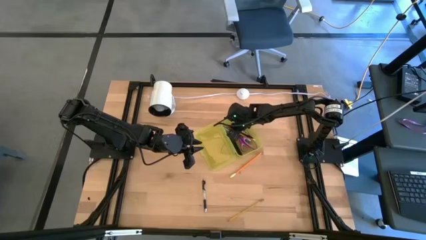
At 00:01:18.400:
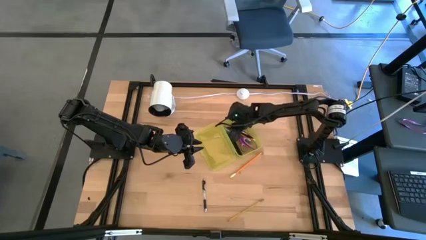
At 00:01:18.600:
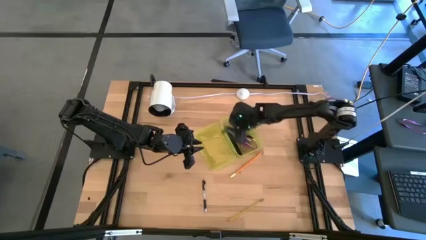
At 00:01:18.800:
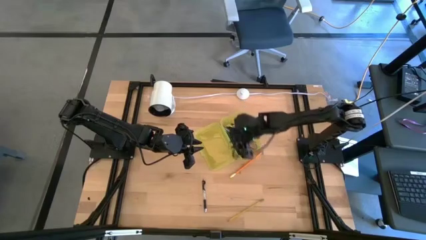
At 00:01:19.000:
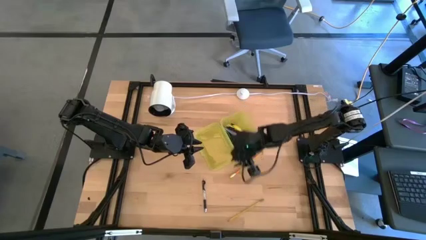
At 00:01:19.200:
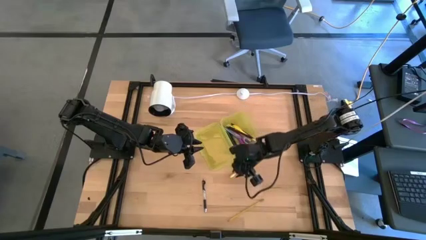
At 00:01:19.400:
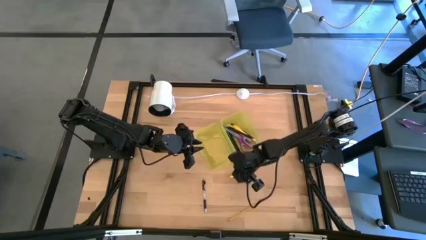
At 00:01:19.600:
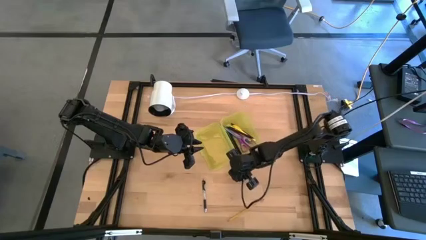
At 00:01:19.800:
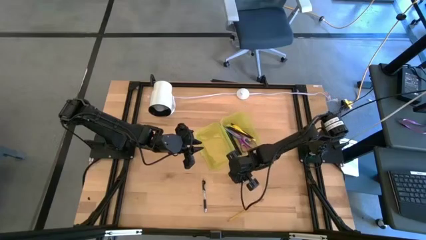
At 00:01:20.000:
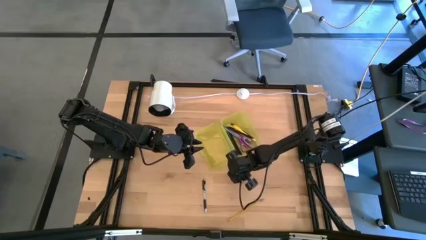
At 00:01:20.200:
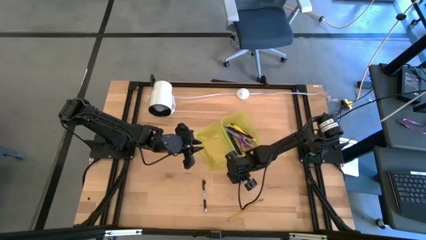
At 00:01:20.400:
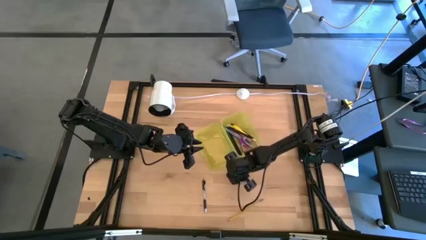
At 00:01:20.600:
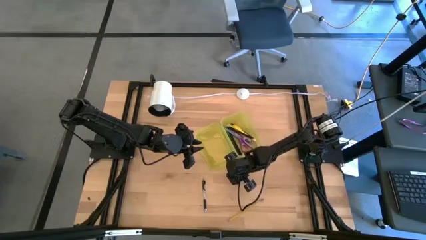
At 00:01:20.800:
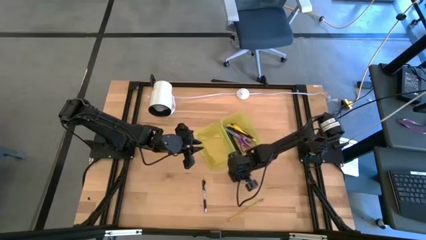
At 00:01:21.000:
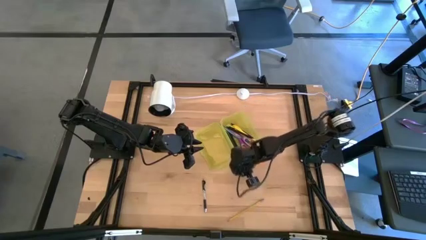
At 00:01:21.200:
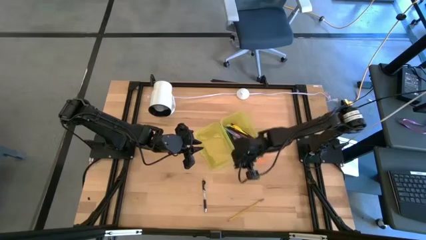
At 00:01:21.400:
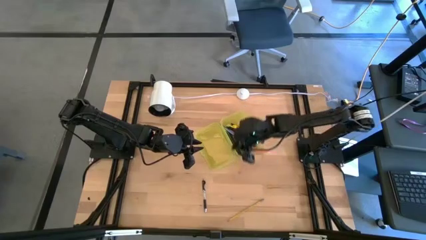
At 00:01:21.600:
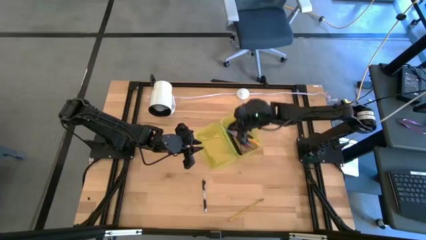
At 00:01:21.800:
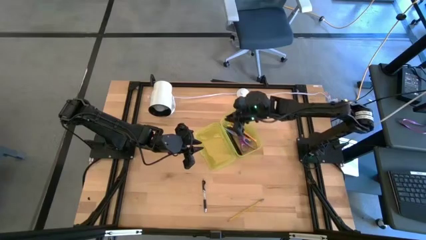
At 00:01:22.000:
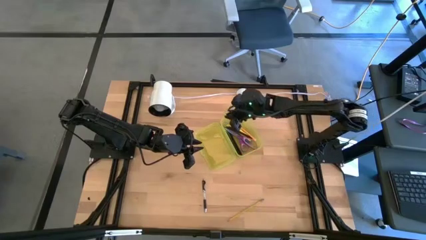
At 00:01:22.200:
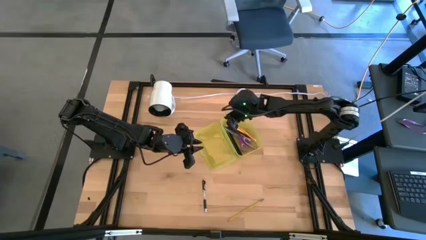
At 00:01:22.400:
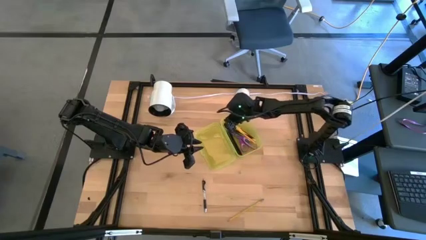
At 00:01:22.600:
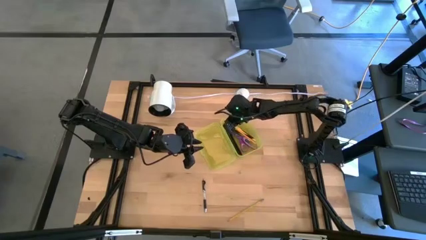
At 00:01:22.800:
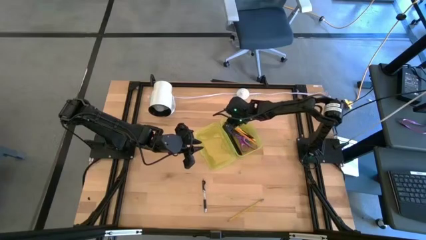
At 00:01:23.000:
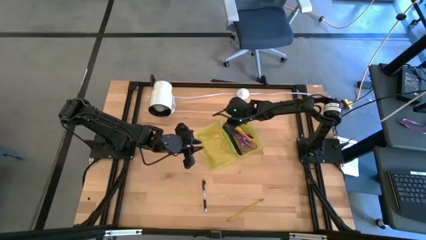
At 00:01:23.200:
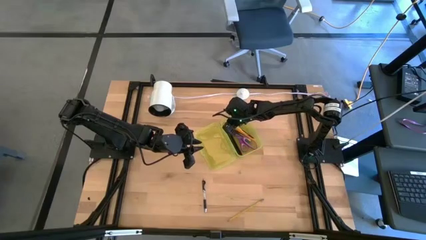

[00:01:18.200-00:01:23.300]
Task: Pick & place school supplies into a supply box
Put the orange pencil into the yellow supply box

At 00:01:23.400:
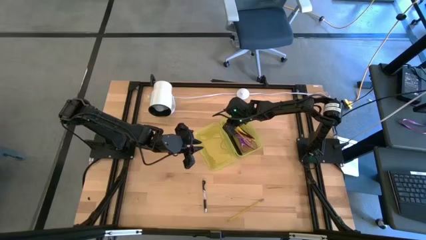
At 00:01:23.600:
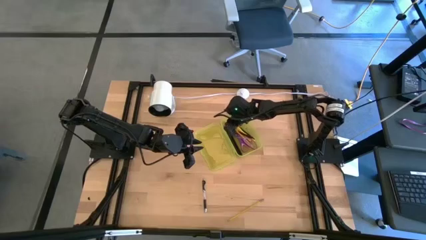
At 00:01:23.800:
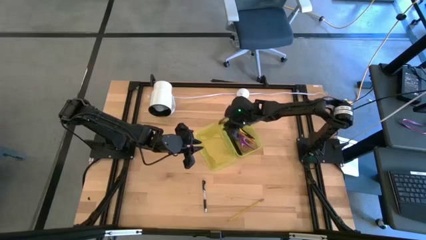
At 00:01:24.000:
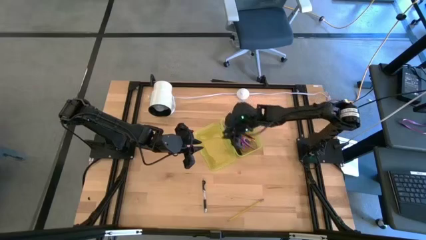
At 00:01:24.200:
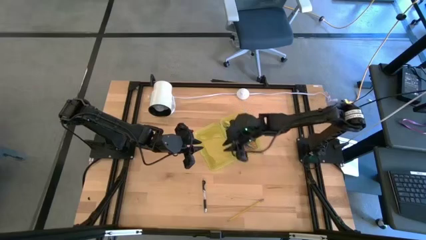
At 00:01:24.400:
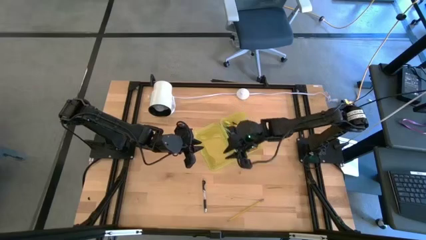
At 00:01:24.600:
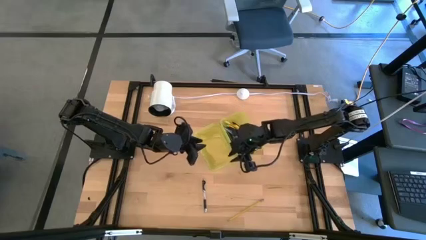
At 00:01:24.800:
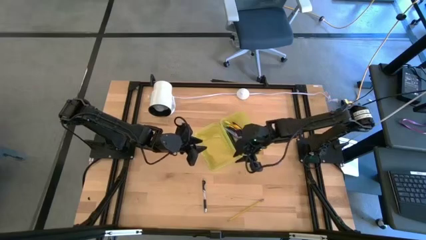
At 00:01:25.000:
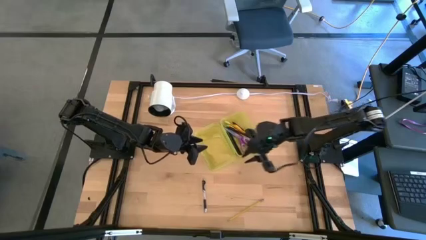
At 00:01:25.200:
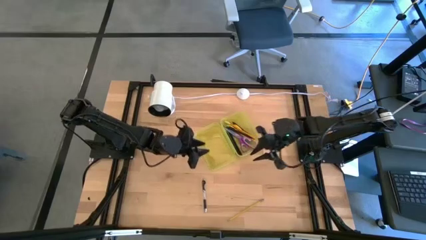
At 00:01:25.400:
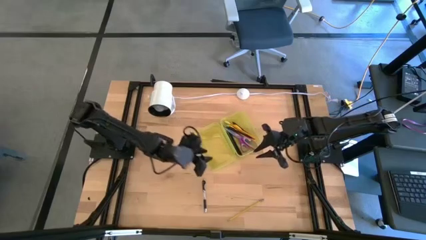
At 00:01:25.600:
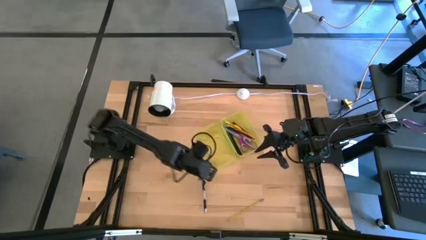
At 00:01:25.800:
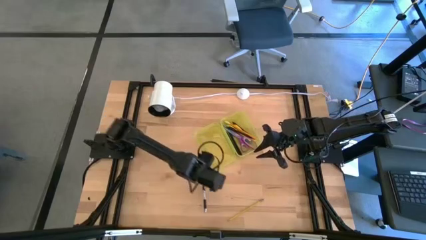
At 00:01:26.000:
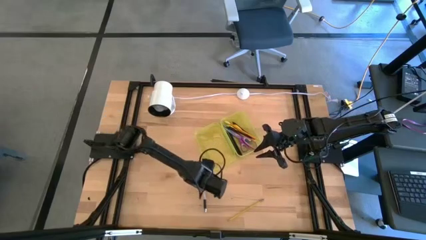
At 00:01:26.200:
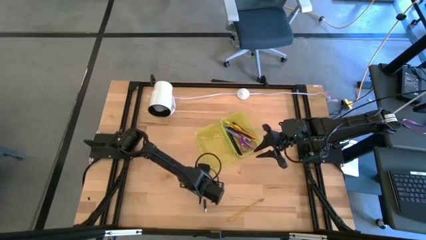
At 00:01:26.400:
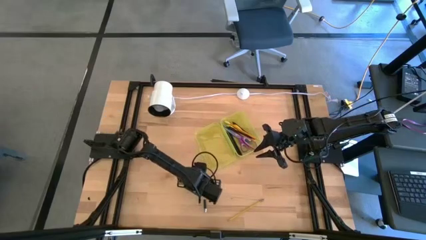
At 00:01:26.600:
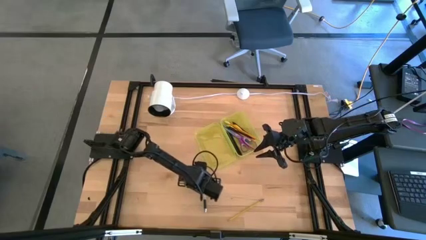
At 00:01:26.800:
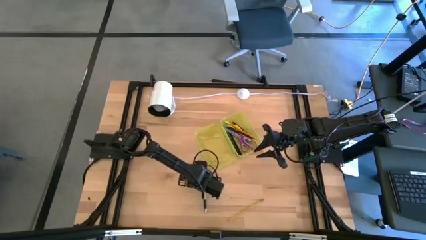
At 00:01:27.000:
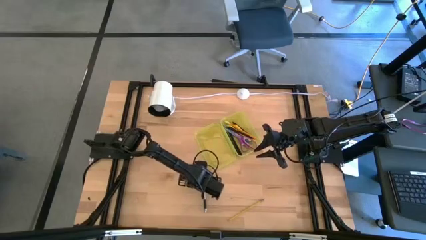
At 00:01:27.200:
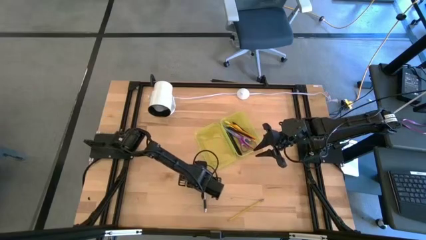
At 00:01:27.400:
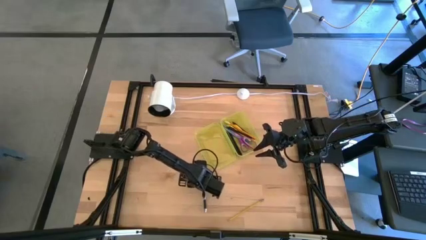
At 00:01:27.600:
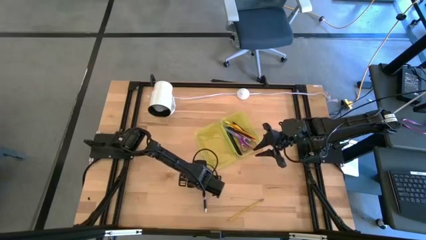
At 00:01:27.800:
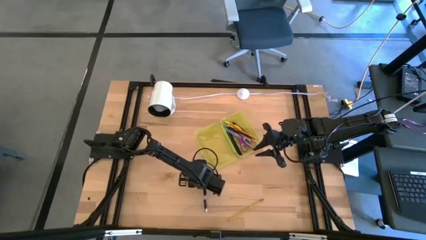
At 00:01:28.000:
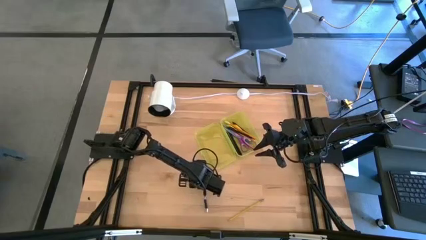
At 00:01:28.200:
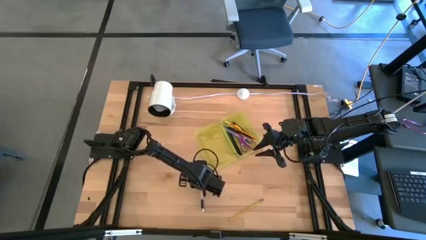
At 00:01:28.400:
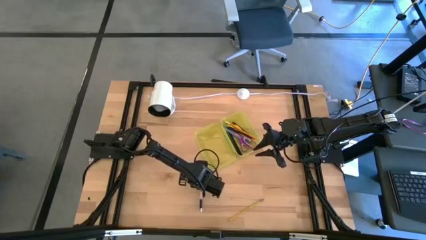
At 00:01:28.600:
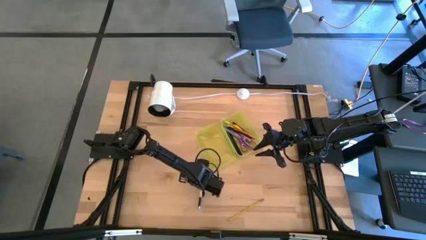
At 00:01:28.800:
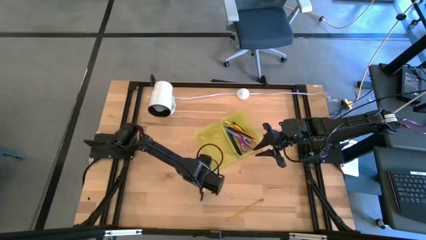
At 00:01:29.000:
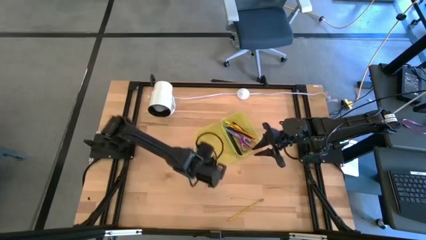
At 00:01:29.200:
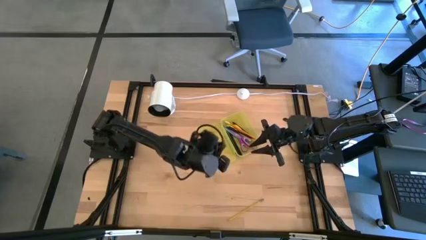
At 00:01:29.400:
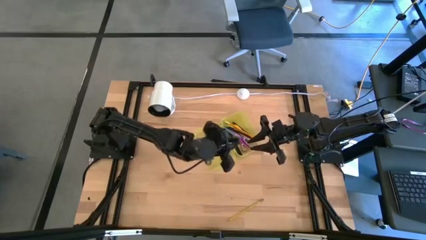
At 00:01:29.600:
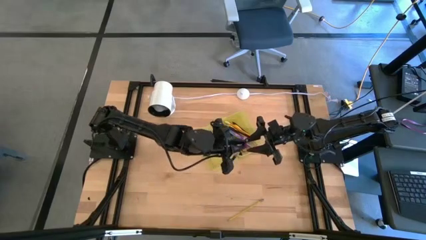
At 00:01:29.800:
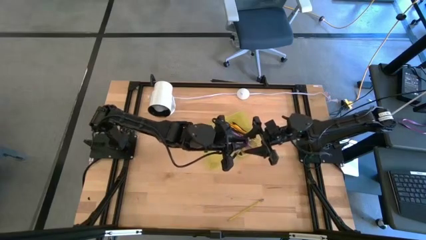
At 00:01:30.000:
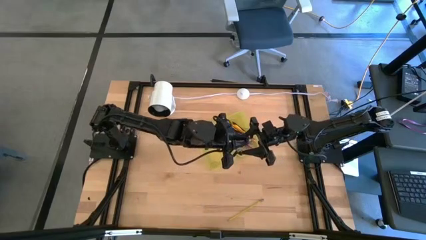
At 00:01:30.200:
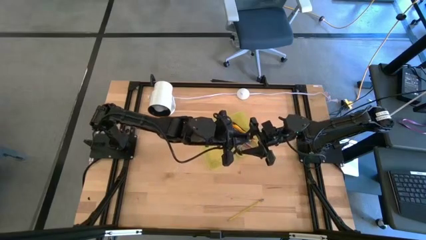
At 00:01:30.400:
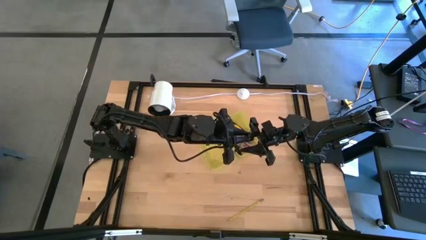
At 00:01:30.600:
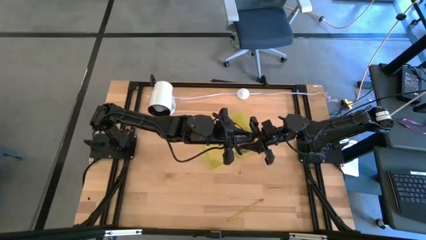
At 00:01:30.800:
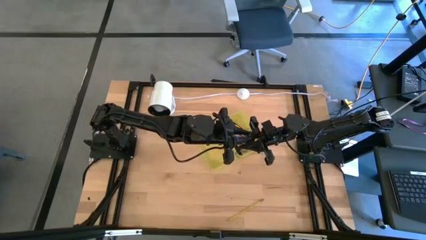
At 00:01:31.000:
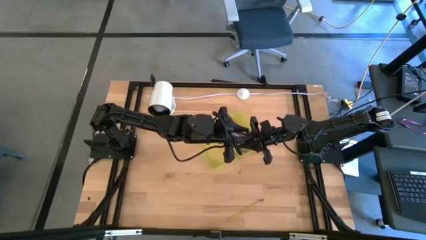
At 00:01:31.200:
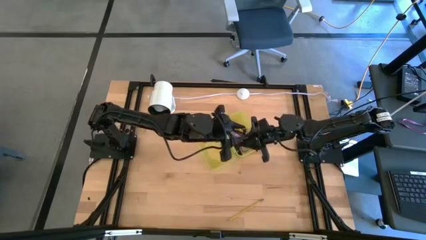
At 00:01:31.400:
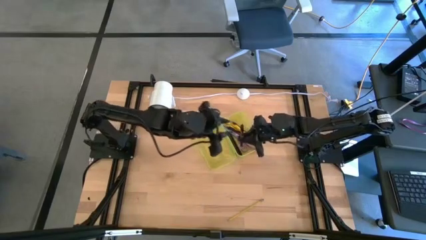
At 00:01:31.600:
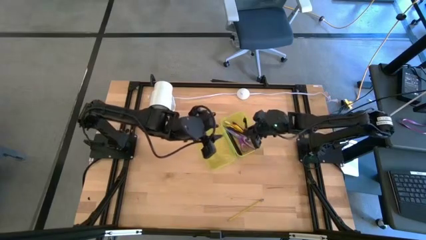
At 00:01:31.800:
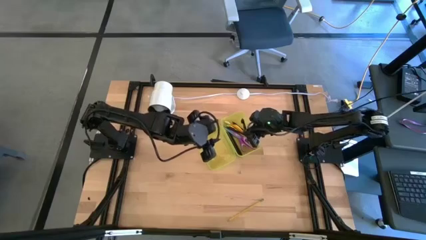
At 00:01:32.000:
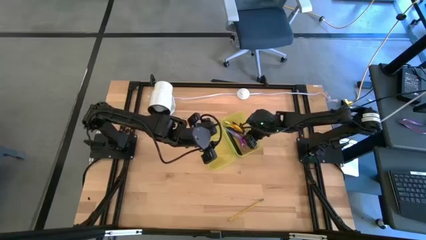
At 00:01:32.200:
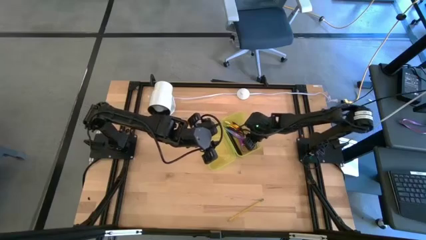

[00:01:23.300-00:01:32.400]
Put the transparent pen into the yellow supply box
